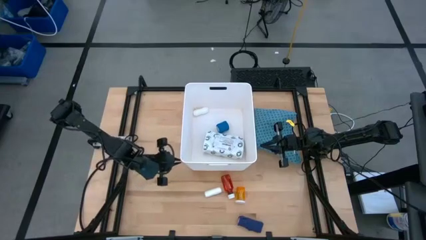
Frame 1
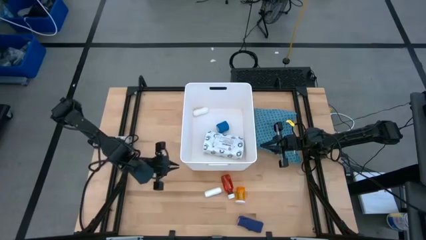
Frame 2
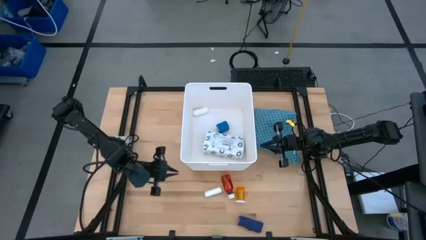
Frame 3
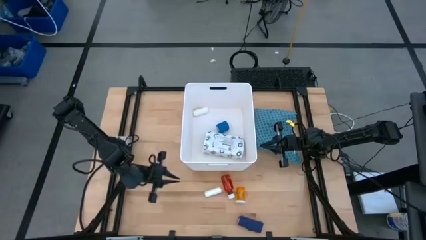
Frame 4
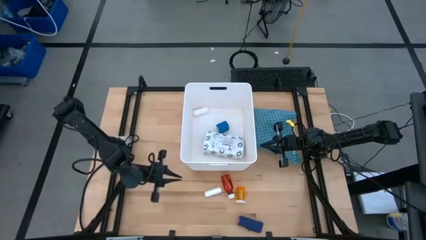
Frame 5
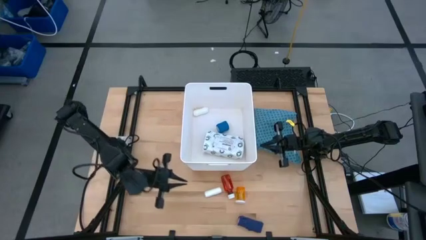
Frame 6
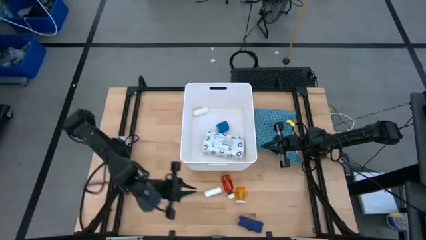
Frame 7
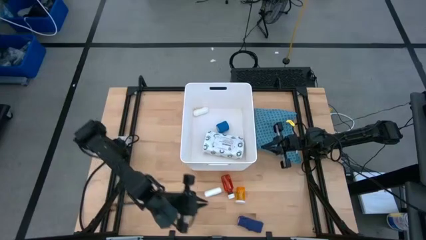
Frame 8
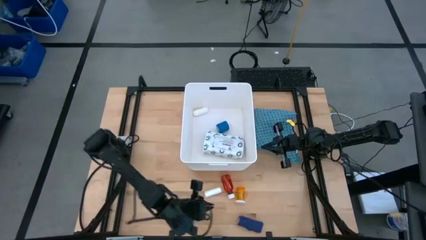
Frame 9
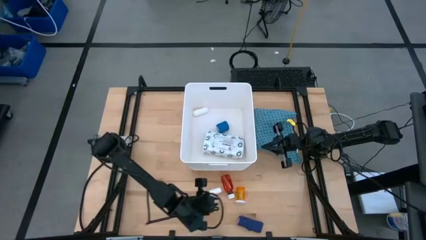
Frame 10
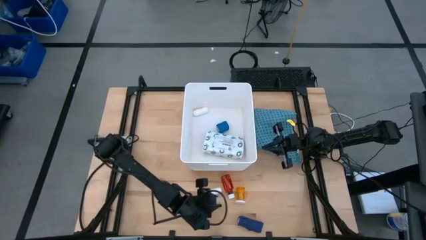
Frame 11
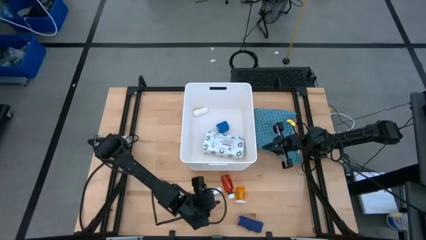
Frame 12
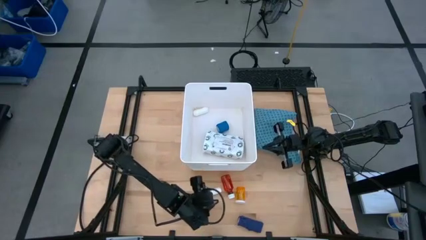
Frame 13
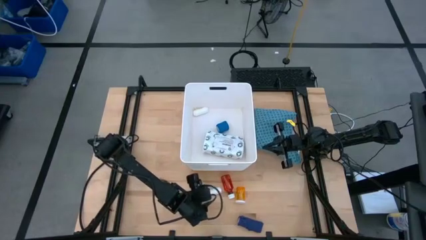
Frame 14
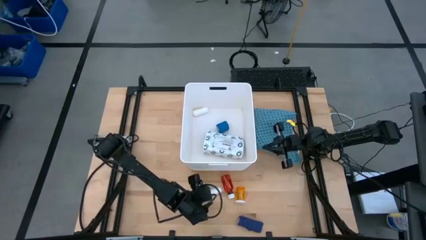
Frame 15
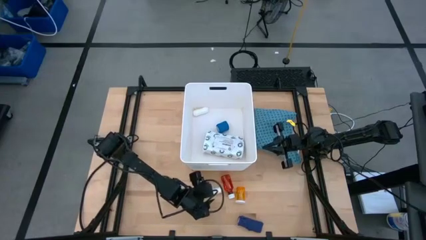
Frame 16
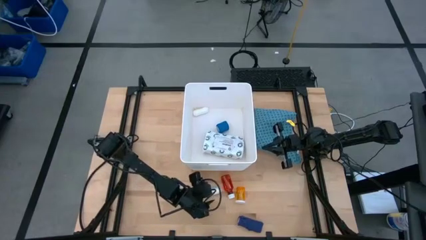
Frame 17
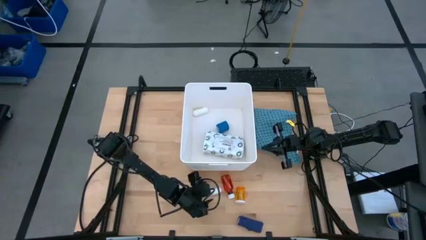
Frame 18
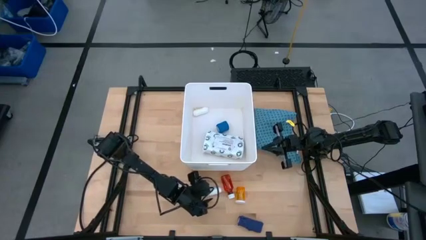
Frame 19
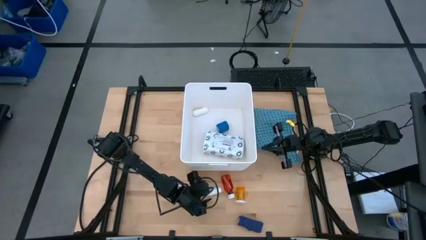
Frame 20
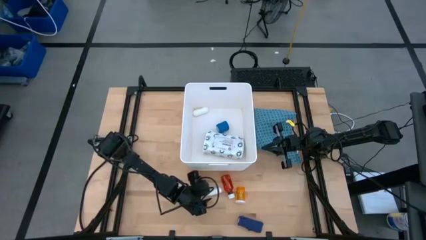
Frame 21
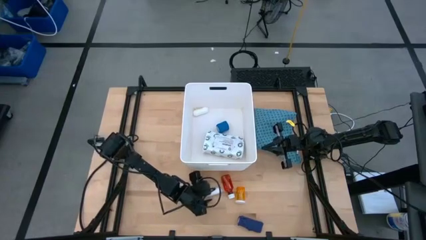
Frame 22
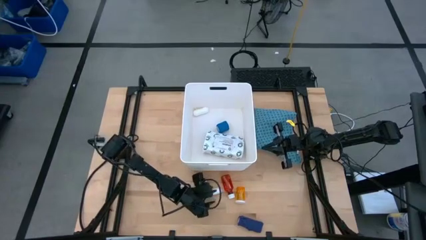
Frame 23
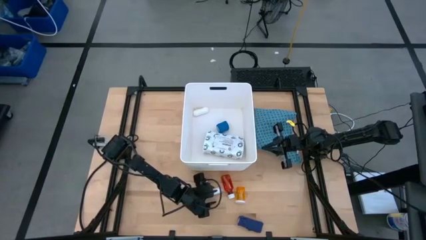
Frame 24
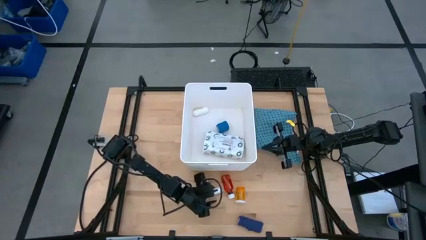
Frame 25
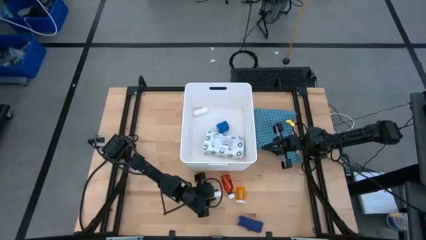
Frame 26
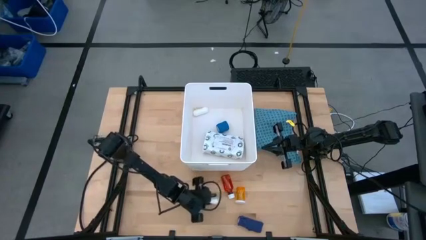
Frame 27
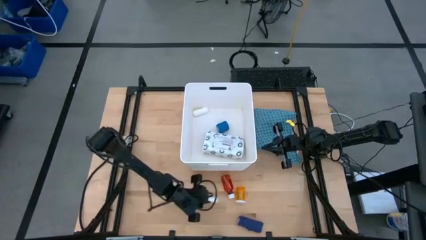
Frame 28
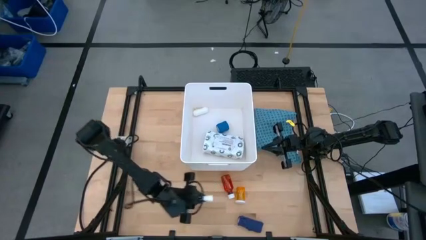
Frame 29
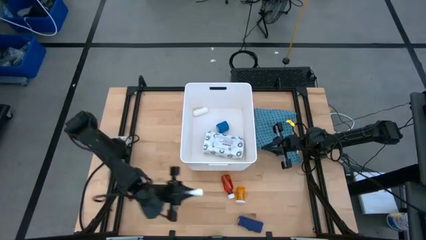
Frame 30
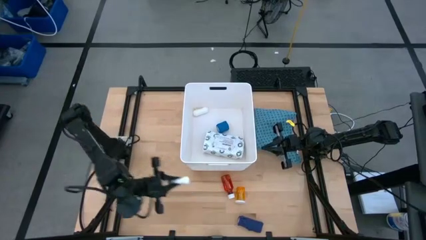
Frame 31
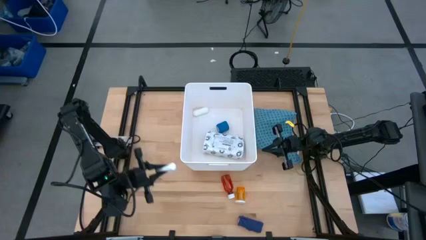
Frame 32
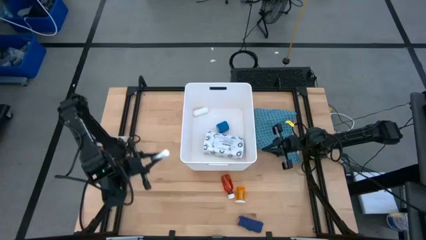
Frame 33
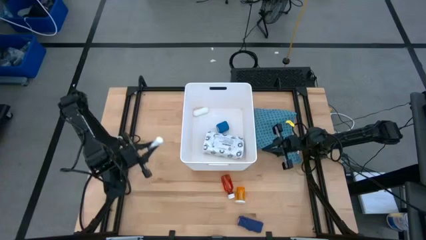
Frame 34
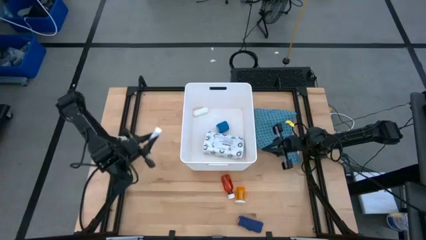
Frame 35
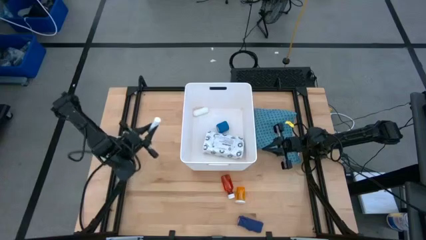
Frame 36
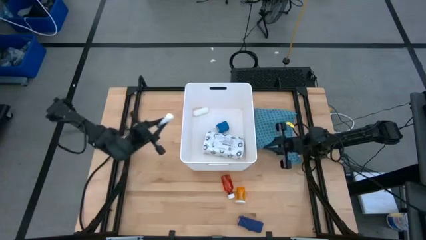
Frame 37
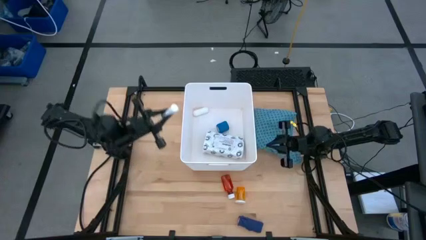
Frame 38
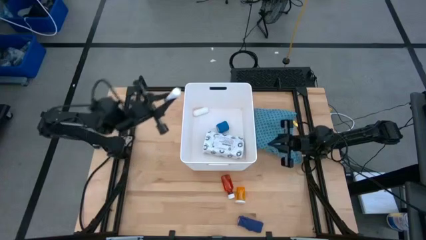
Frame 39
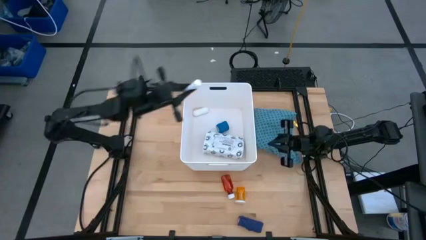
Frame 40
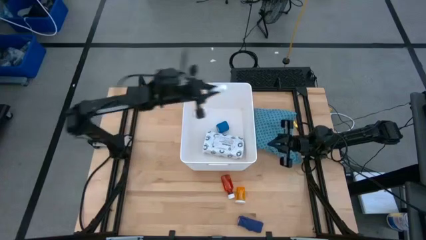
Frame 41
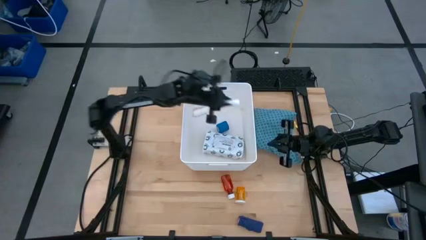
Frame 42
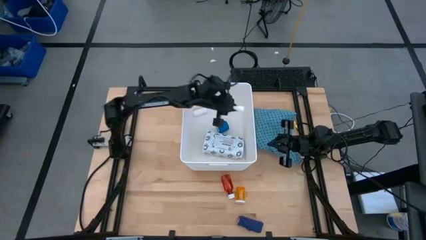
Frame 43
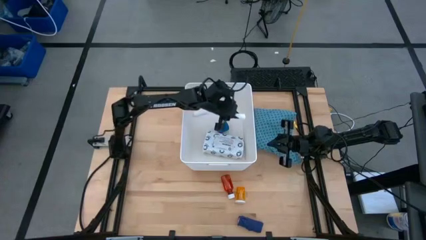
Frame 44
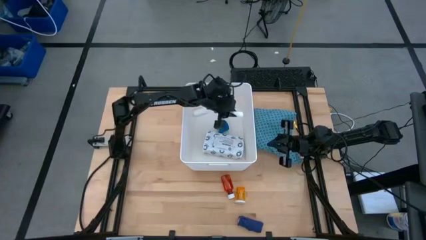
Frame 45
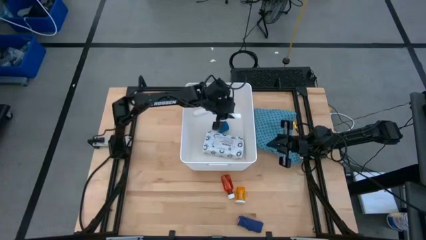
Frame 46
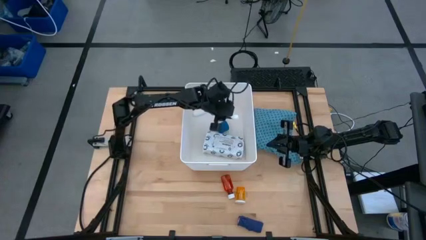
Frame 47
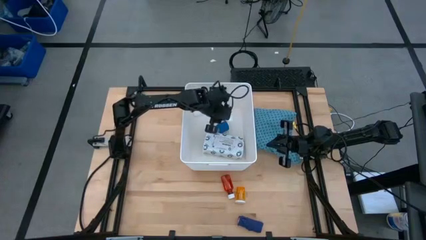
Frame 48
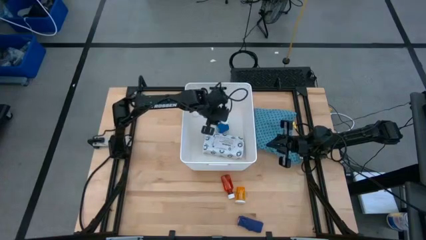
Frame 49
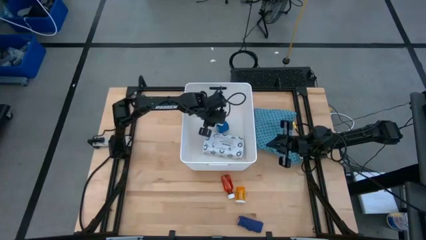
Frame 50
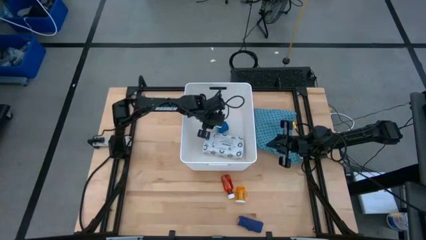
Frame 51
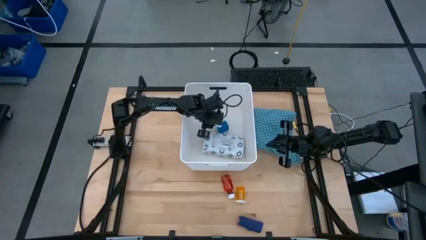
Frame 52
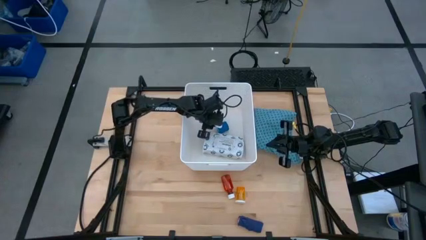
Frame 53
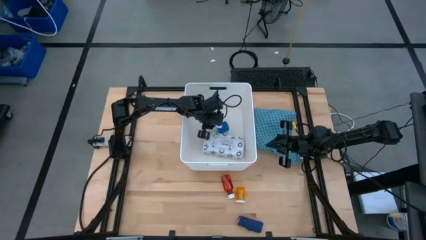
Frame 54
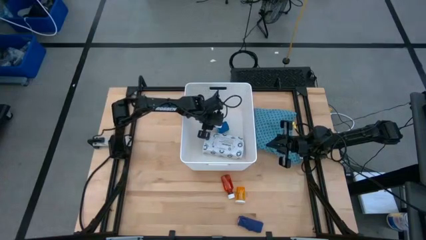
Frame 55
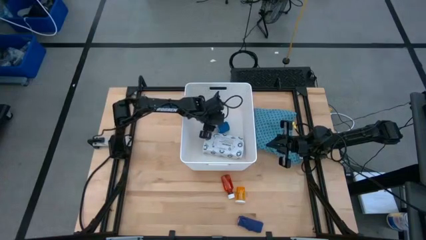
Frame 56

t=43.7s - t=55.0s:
Task: Pick & place medical supplies in basket/bin
Put the white rolled gauze into the white bin

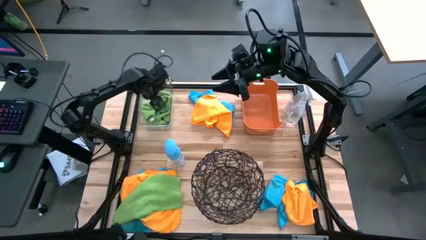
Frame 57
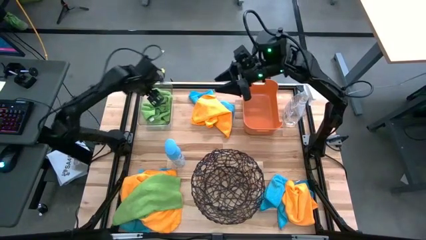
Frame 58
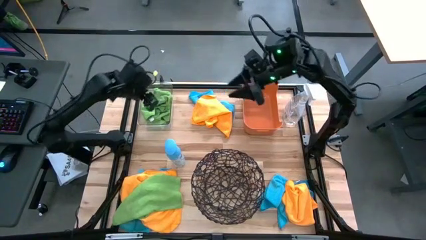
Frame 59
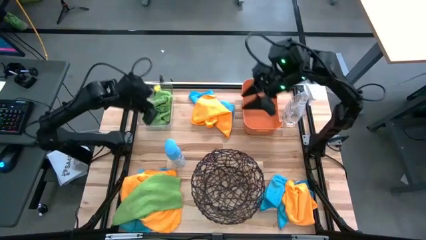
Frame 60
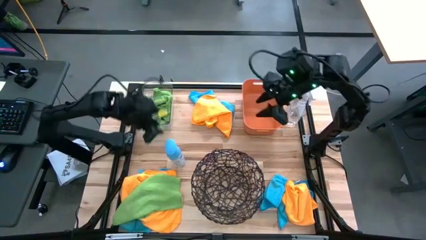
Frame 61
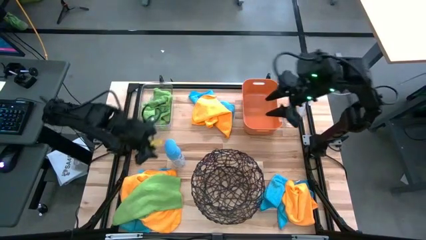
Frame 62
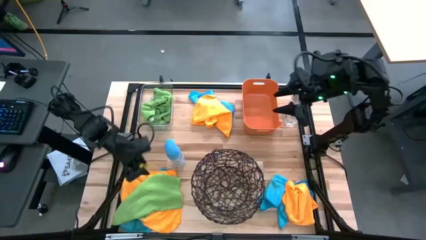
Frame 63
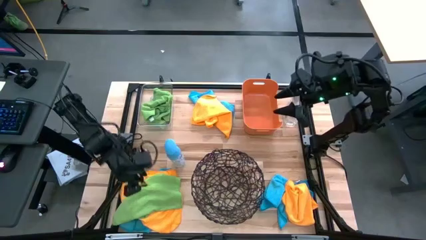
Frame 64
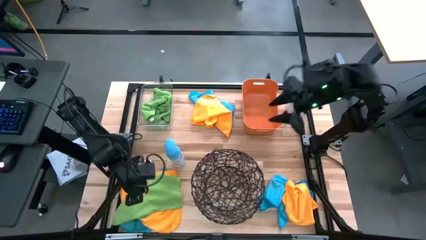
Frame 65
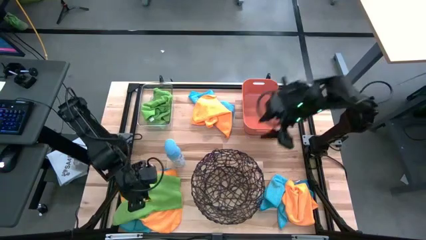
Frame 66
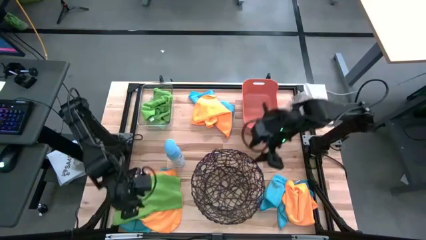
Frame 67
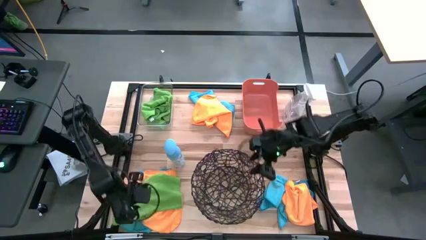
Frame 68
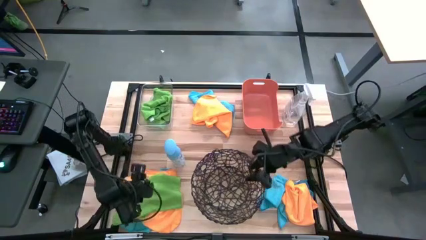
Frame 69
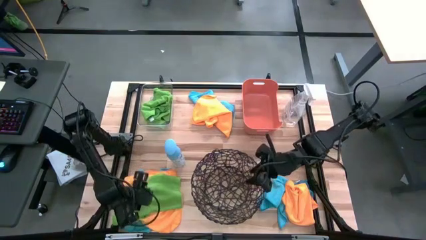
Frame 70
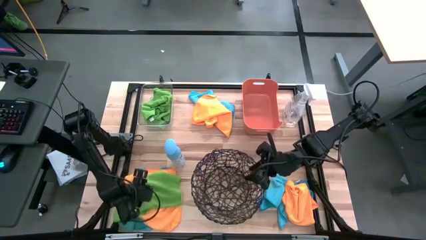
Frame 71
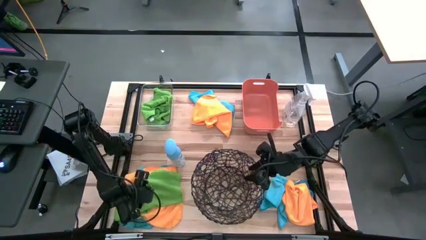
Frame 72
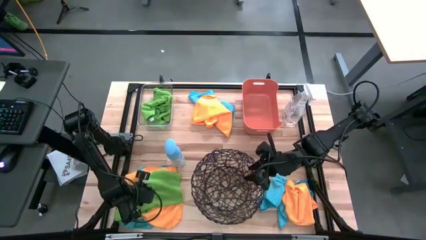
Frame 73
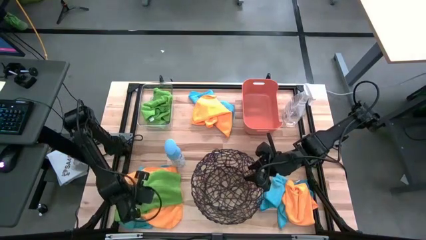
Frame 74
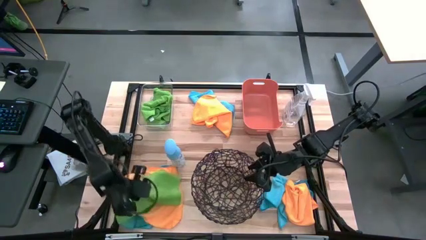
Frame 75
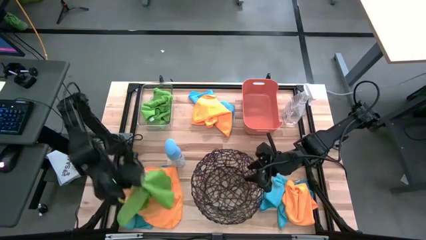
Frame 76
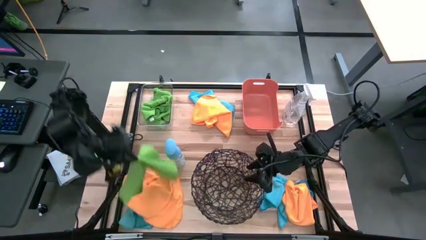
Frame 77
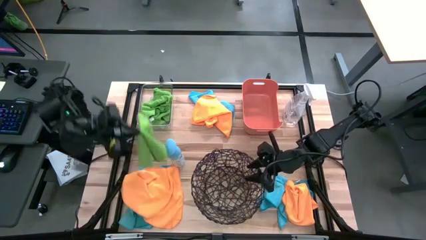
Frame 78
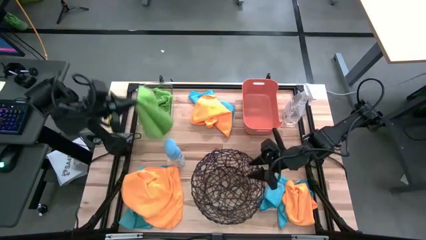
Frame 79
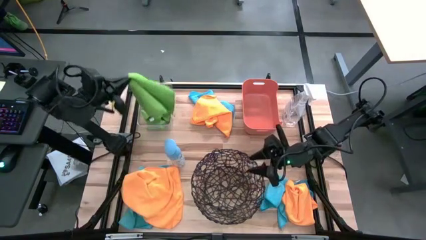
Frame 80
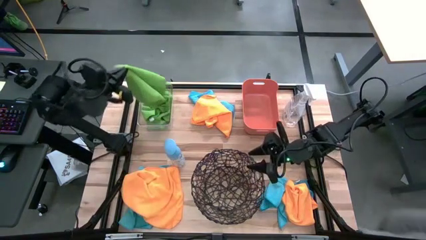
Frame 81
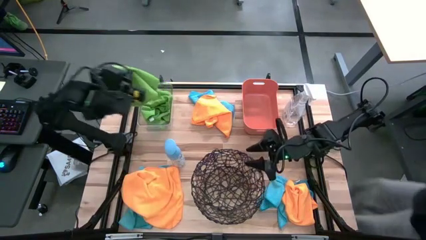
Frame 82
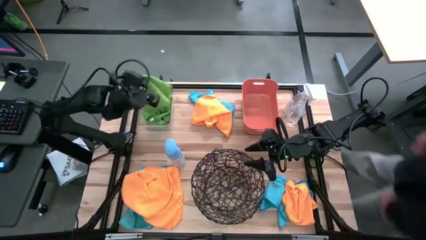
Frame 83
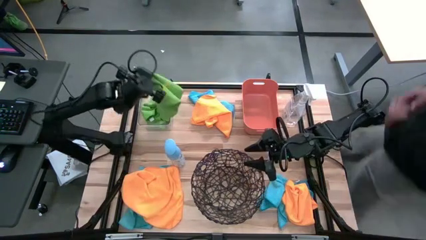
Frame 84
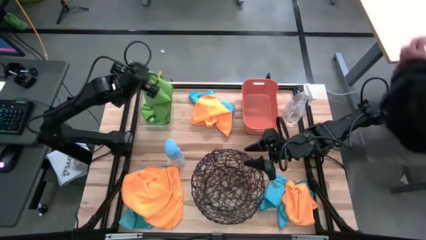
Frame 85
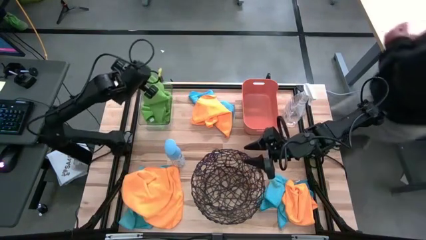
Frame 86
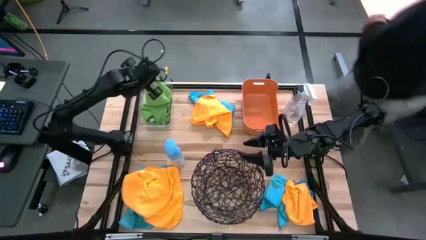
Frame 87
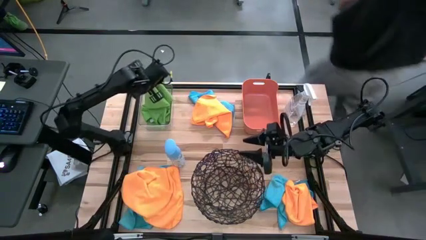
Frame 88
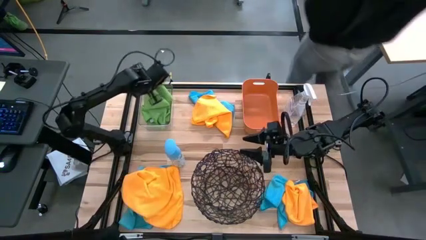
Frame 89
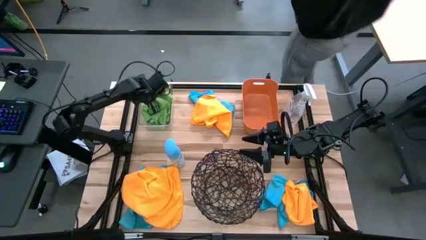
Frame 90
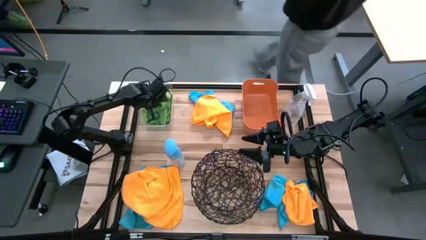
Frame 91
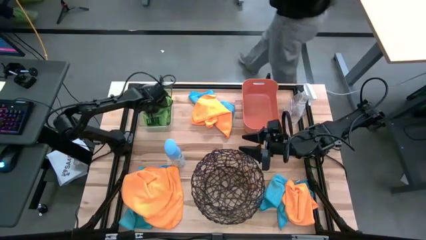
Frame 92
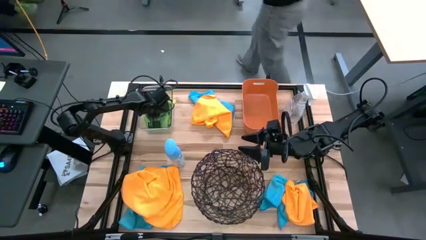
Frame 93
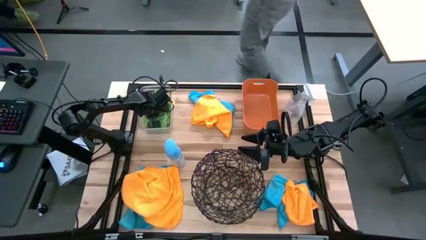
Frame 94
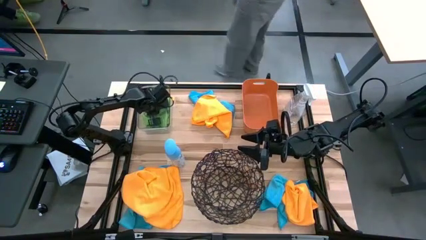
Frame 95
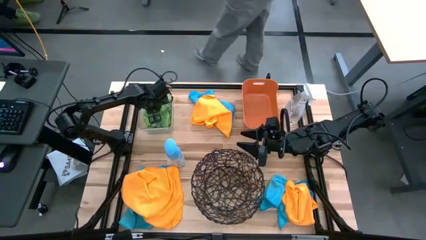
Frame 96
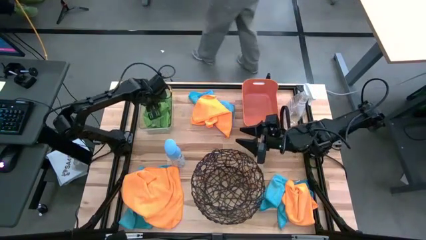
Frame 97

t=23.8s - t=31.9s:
Task: Sort microfiber towel by color & place in baskets
Put the green microfiber cloth into the transparent bin
